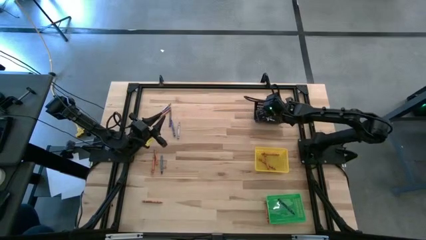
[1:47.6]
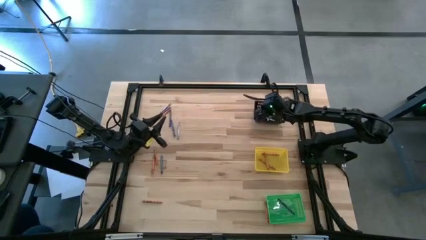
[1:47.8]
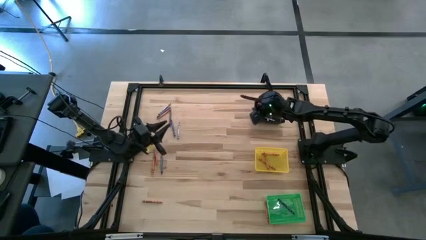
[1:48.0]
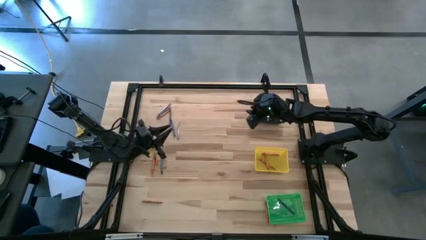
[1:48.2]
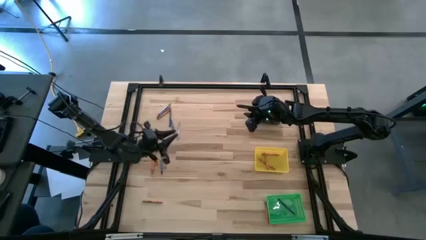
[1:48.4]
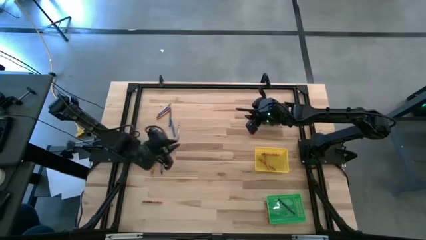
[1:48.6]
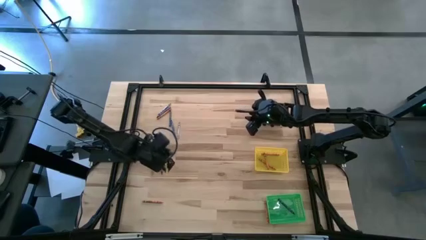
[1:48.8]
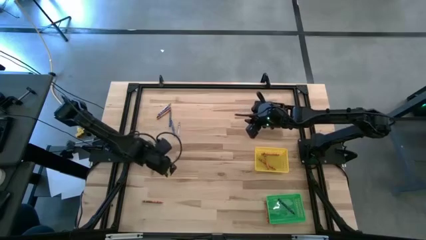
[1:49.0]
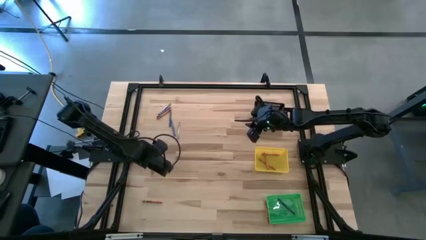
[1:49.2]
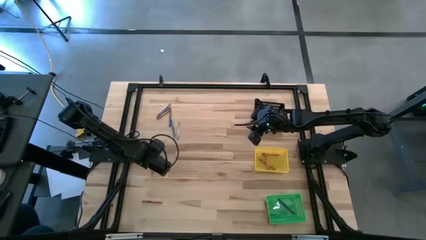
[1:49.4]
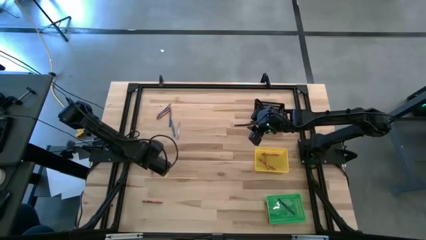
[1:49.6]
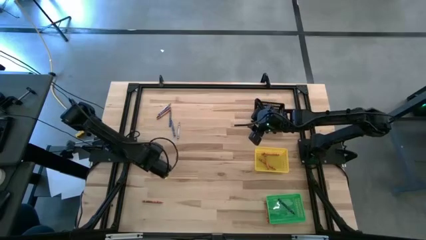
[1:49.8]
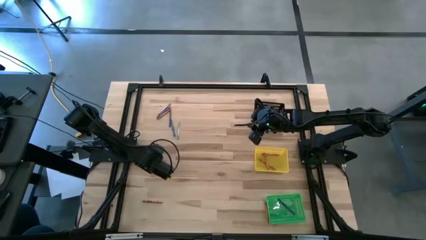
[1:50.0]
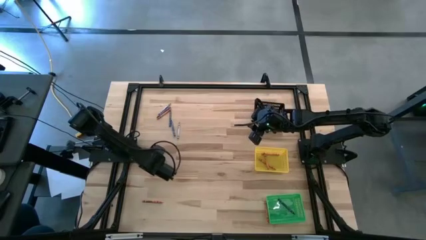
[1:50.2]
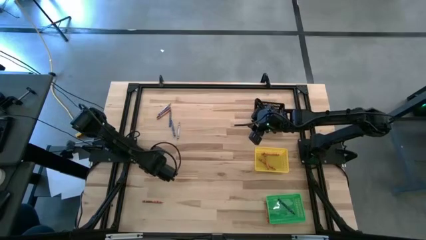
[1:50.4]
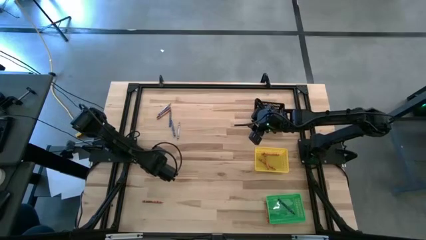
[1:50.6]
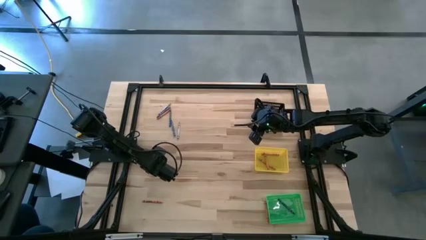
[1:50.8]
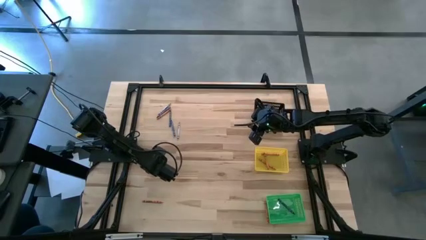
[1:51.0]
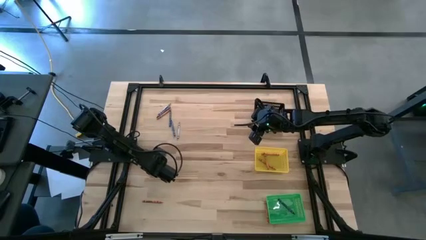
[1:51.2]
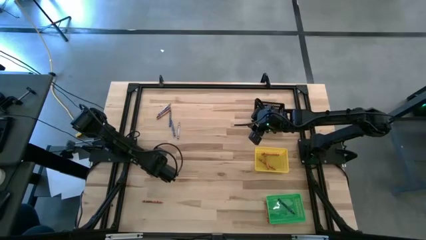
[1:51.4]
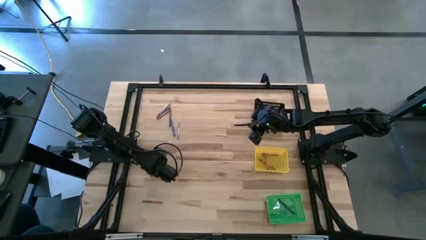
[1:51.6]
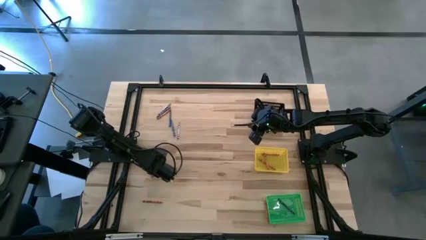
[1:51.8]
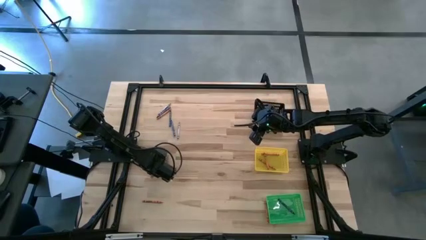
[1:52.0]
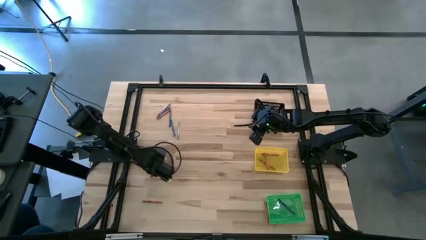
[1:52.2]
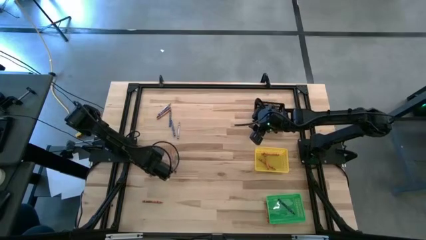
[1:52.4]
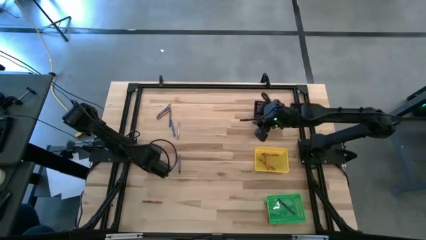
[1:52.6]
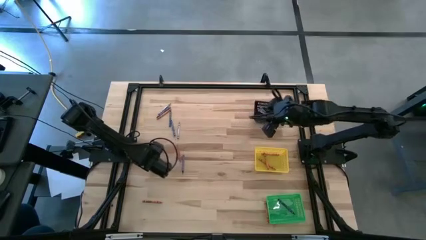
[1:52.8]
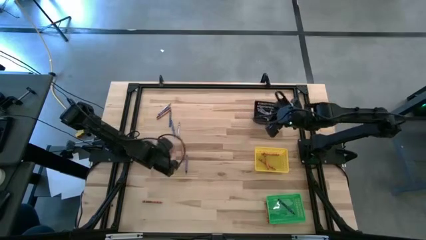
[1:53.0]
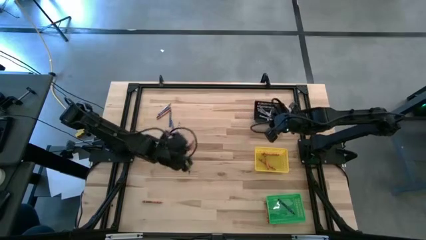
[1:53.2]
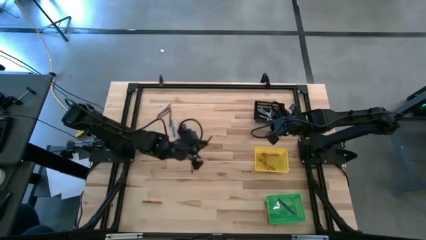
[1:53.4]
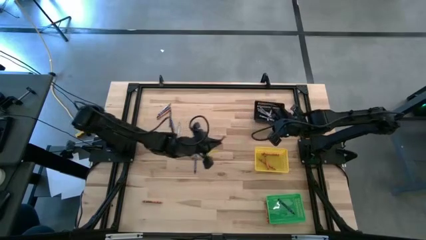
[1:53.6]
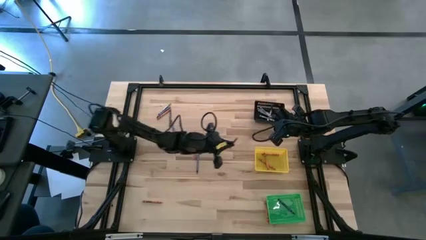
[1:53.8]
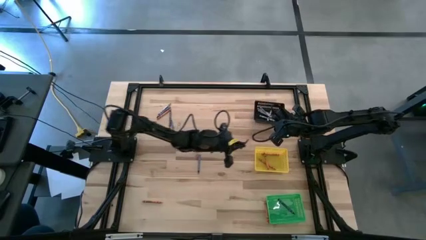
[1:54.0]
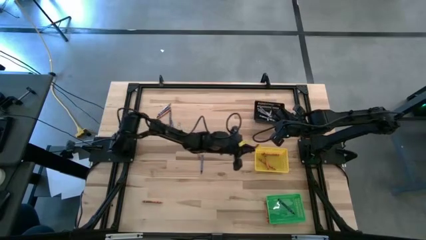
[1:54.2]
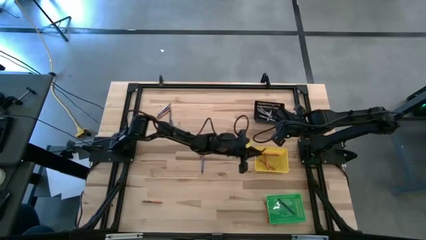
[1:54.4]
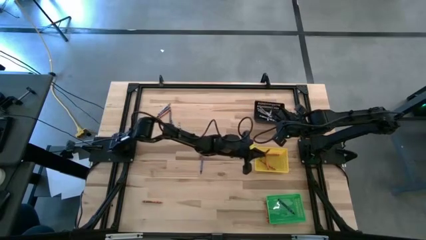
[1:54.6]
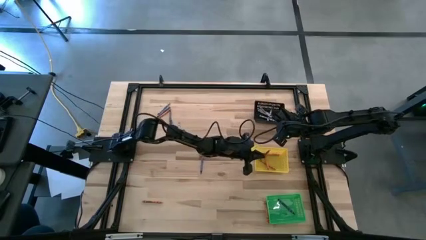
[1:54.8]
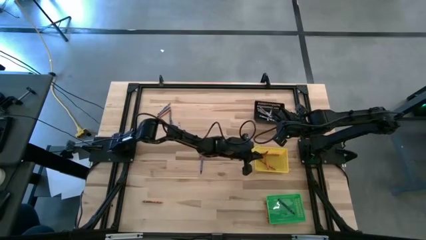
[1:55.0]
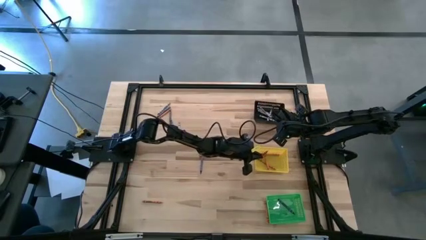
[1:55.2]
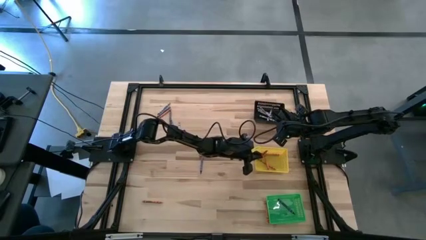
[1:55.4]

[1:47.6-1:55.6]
Task: Sort crayons
Put the orange crayon into the yellow basket

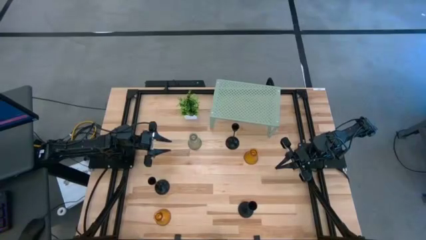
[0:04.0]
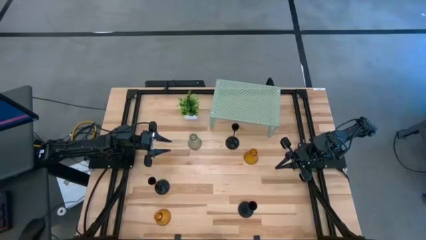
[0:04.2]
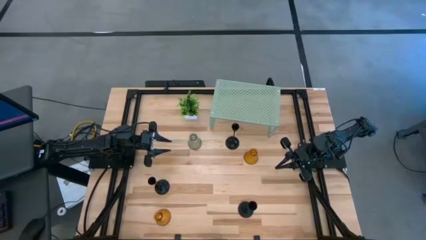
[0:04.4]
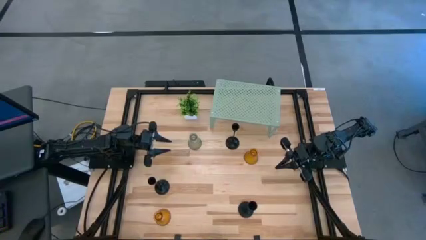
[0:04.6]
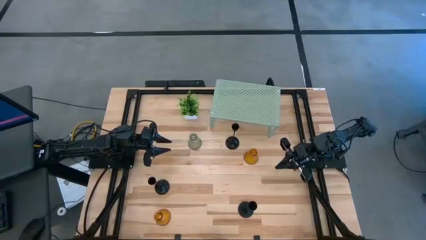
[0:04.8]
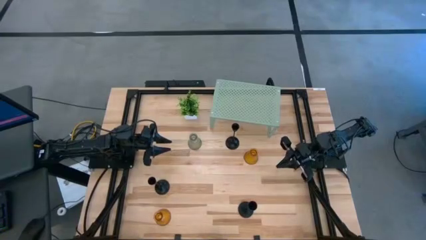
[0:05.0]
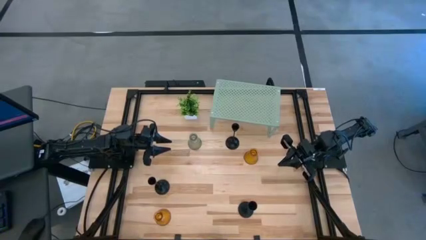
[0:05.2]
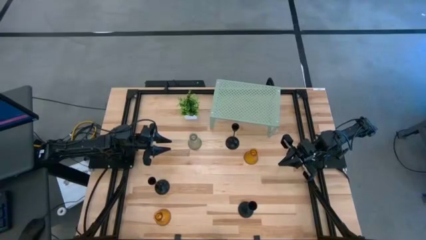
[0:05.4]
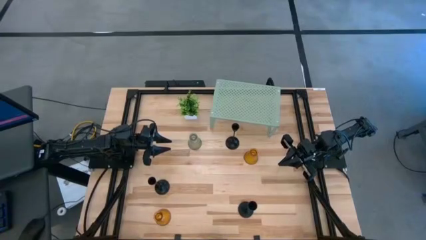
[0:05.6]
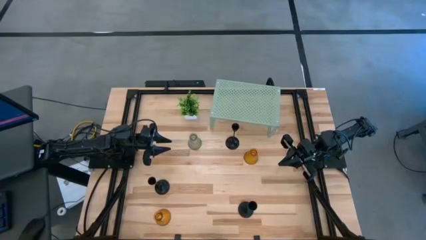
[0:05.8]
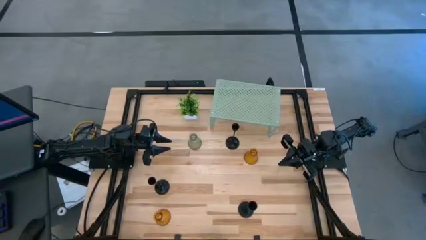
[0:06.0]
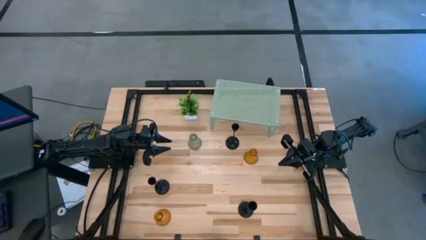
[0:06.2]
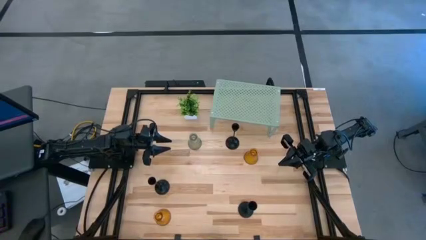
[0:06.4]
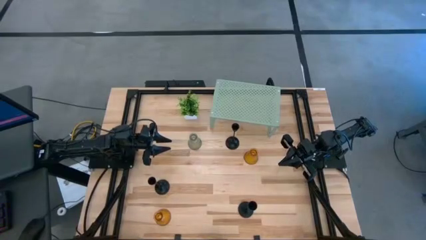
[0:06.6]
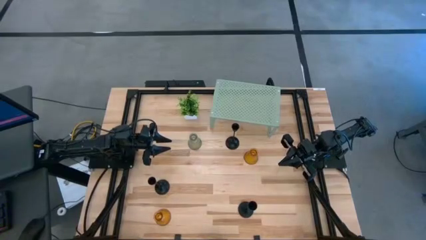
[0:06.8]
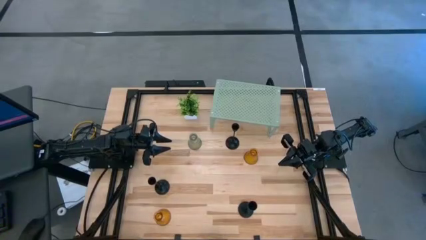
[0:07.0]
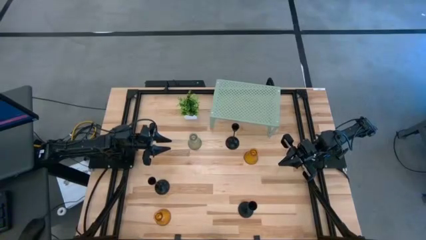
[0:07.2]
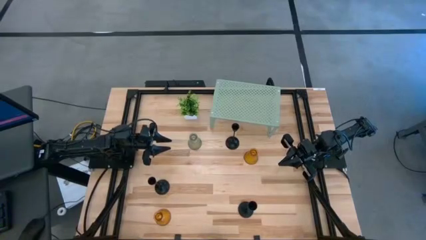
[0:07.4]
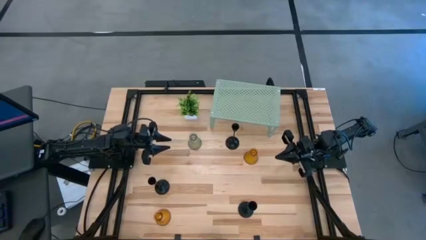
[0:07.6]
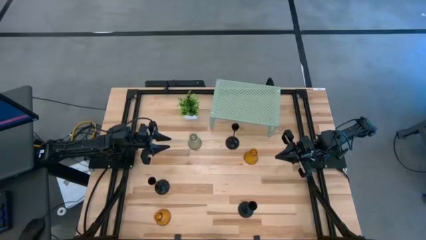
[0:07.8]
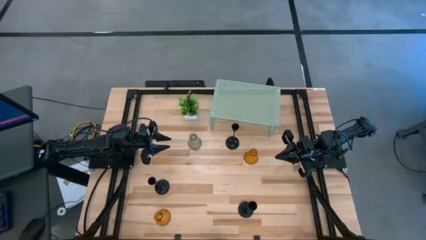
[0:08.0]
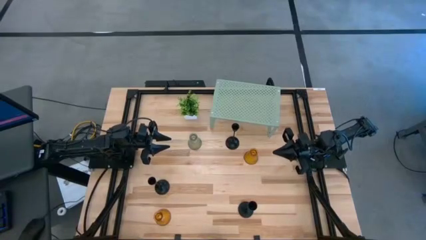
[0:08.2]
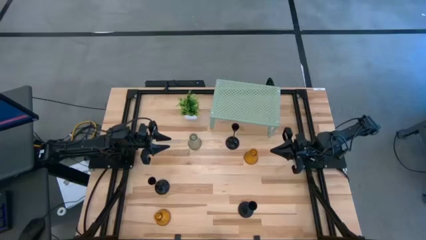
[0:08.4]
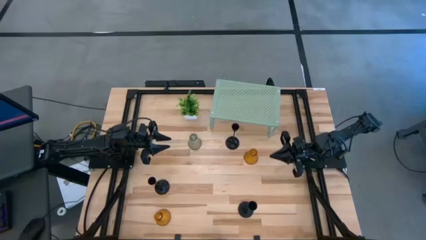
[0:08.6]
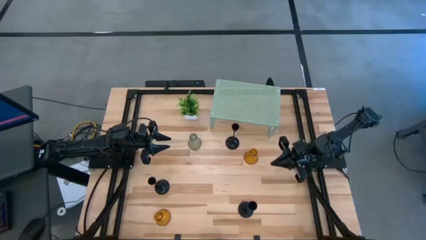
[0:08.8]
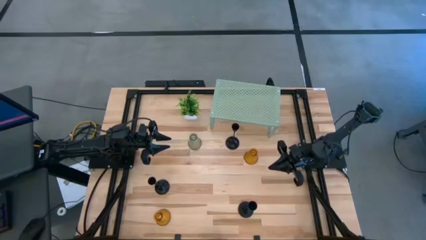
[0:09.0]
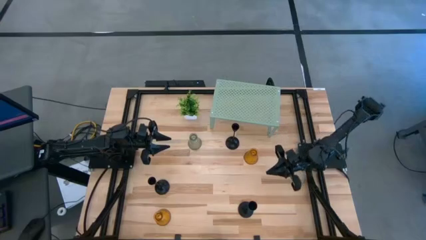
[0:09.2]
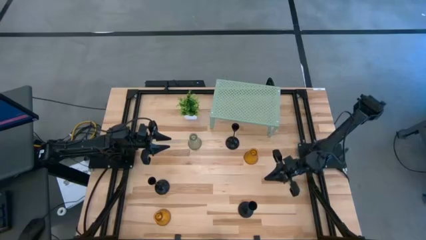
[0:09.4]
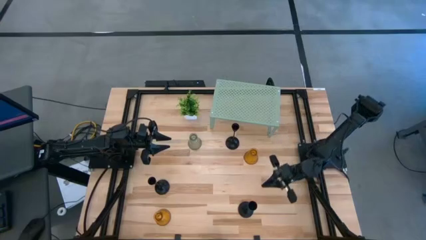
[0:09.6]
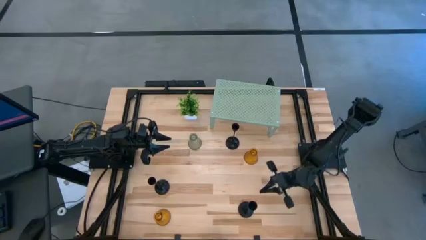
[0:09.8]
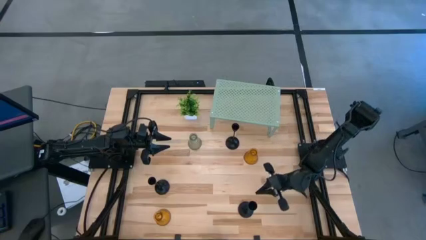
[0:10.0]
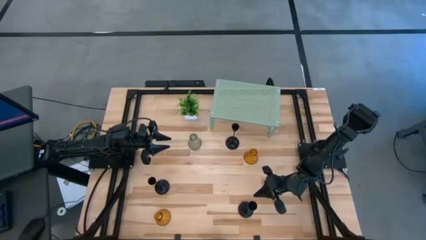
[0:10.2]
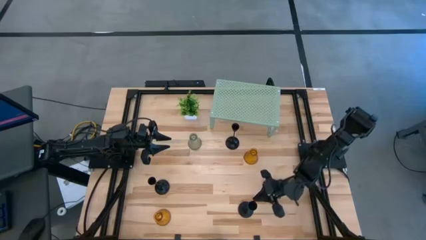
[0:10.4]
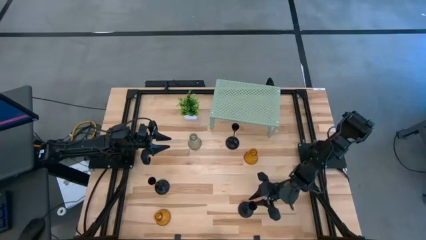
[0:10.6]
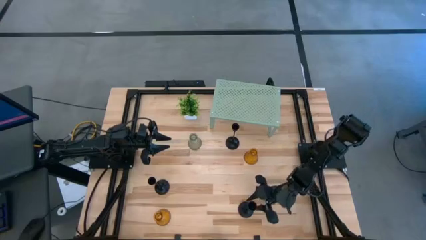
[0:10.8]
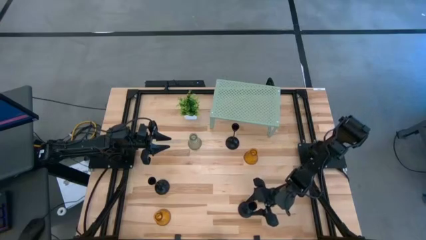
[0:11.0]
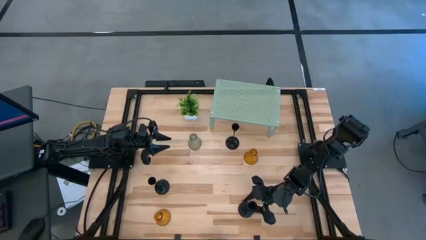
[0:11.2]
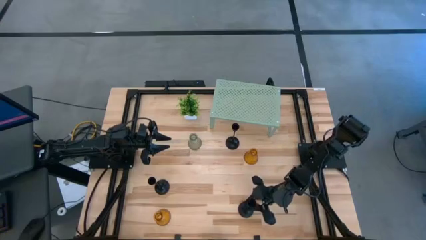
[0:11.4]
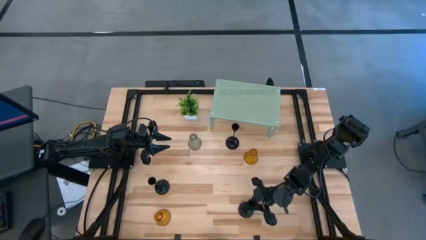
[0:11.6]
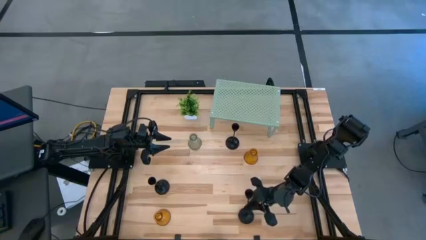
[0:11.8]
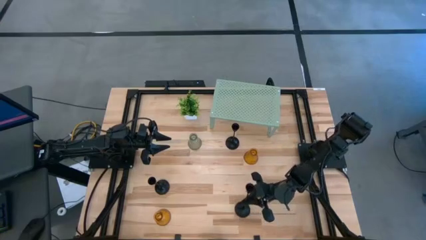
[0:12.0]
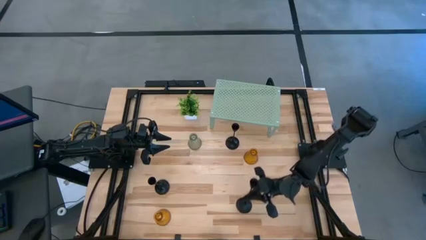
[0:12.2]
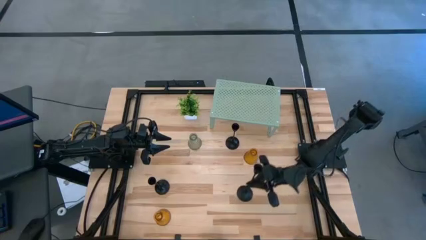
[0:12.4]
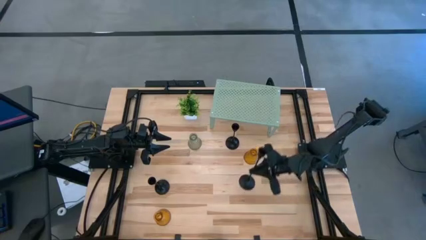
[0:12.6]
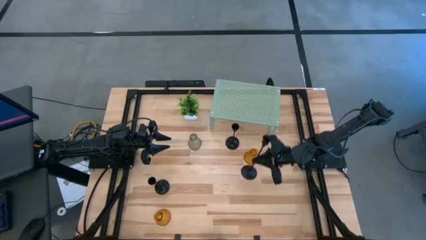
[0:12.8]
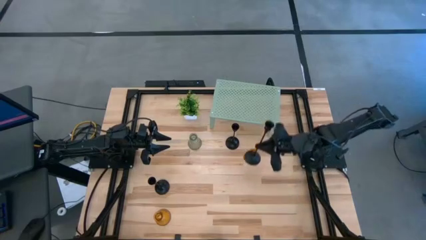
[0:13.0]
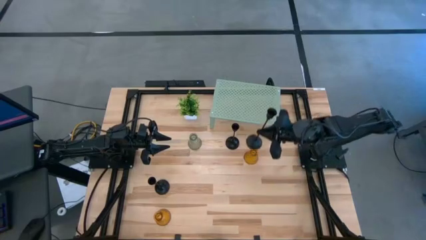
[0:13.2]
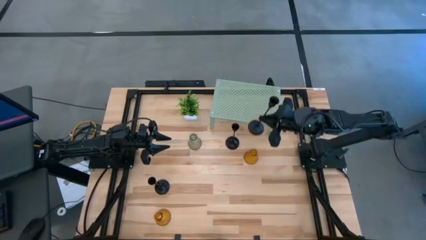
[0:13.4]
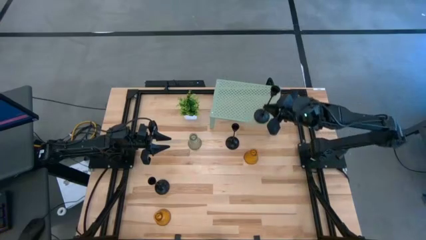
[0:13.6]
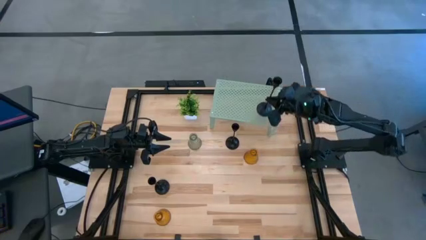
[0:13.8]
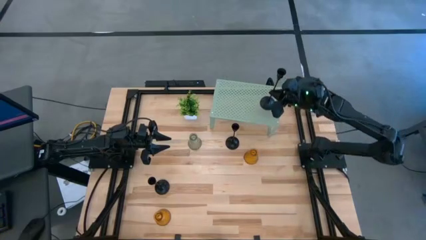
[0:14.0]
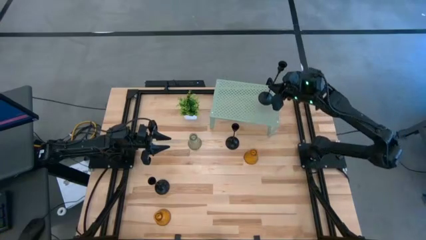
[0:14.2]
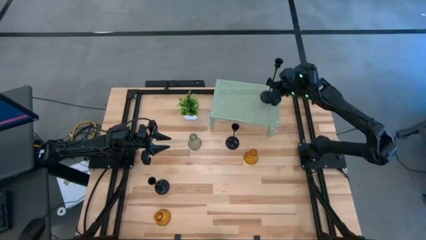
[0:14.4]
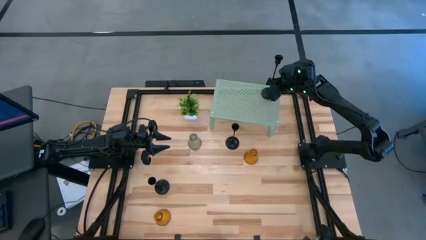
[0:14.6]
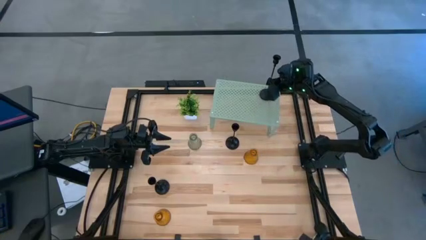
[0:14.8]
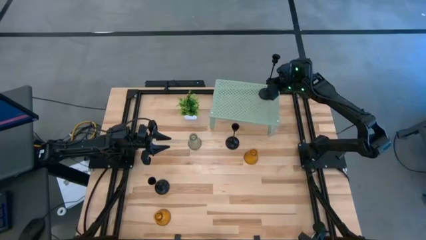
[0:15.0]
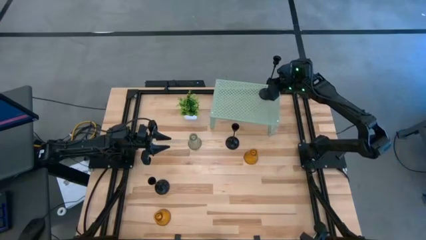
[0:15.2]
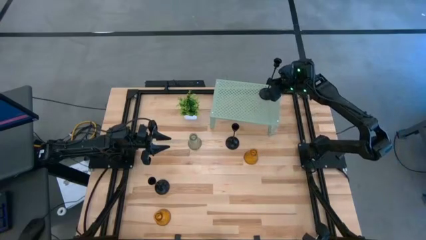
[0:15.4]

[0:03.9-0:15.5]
Task: Pick & Place candle stick holders
Put the bottom right black metal candle holder on the shelf
